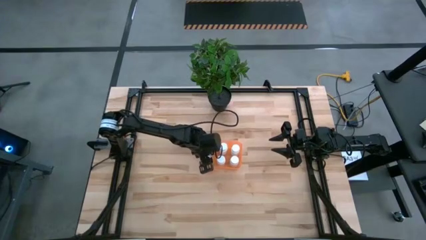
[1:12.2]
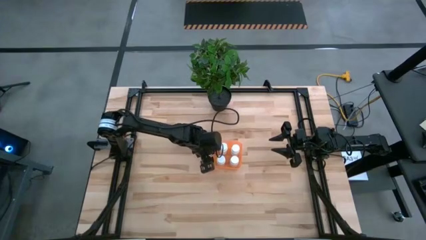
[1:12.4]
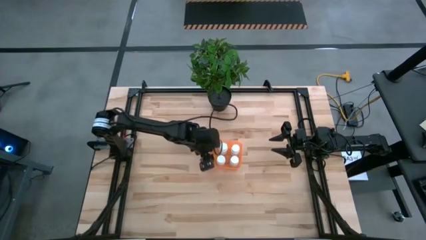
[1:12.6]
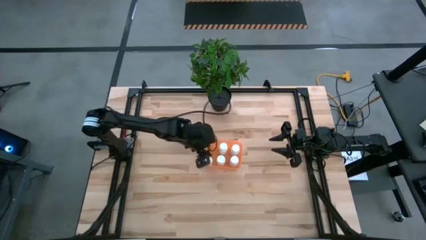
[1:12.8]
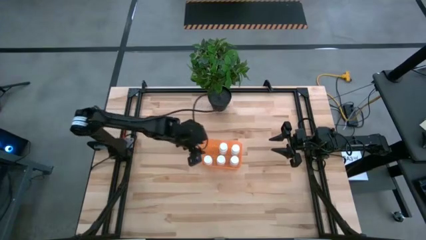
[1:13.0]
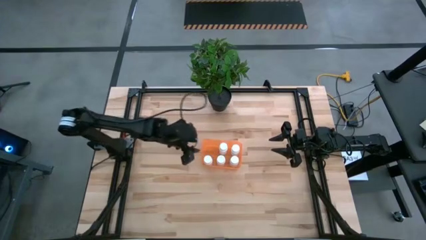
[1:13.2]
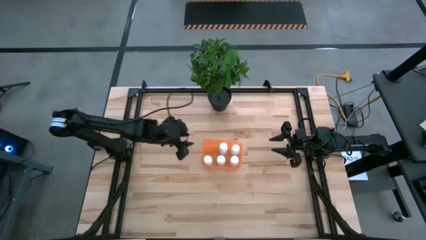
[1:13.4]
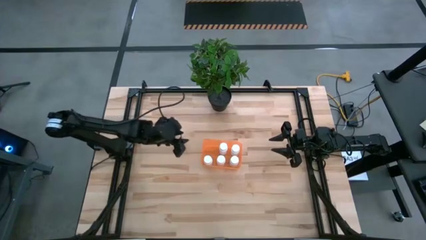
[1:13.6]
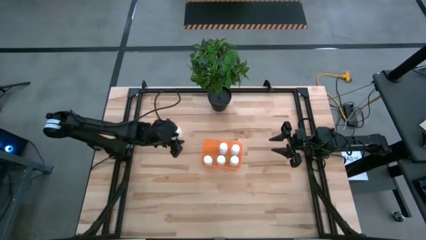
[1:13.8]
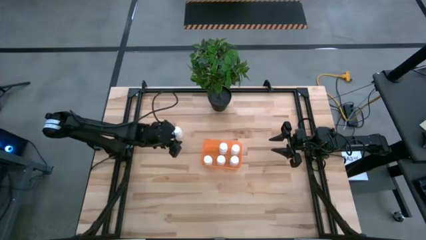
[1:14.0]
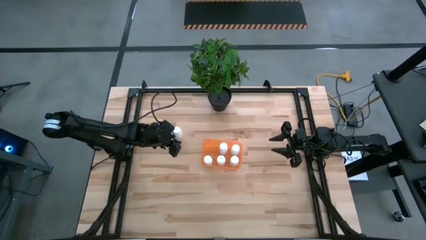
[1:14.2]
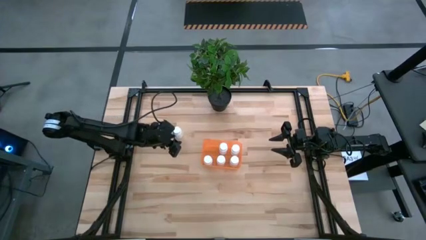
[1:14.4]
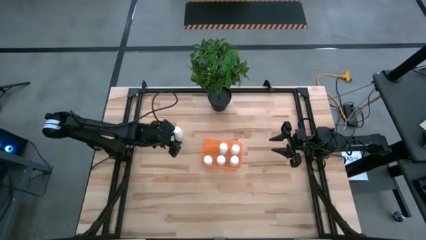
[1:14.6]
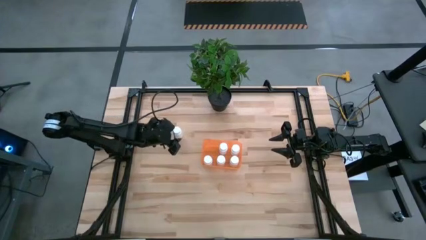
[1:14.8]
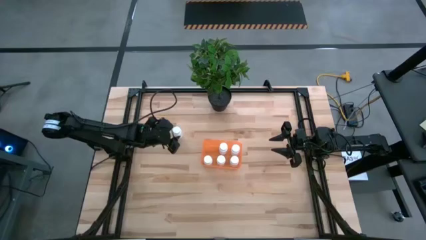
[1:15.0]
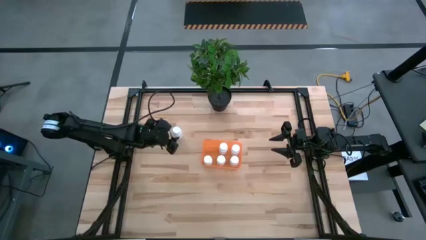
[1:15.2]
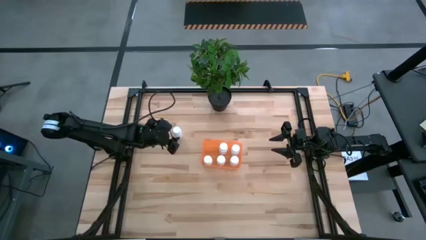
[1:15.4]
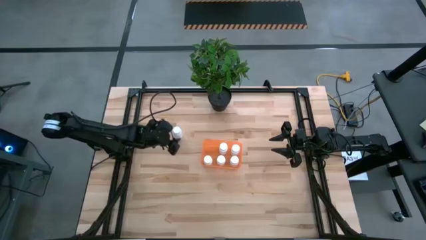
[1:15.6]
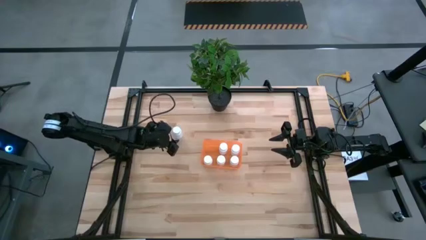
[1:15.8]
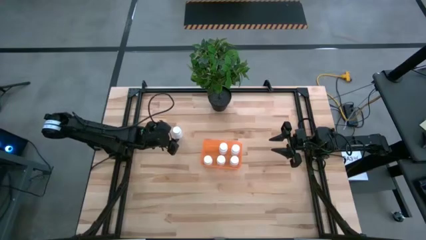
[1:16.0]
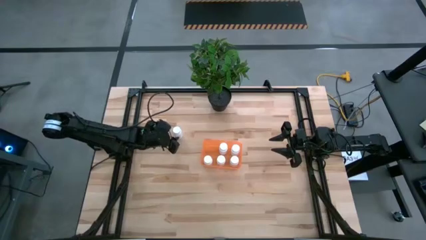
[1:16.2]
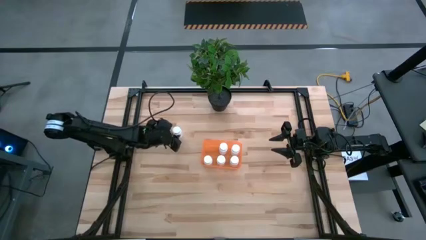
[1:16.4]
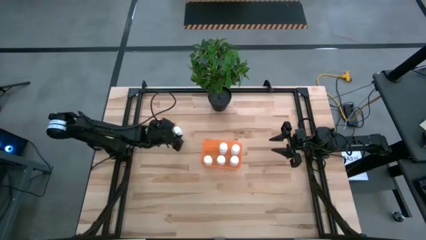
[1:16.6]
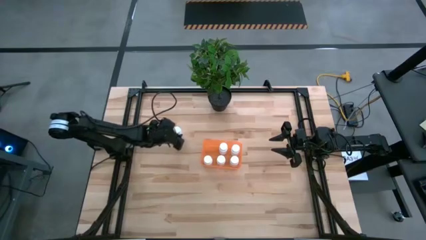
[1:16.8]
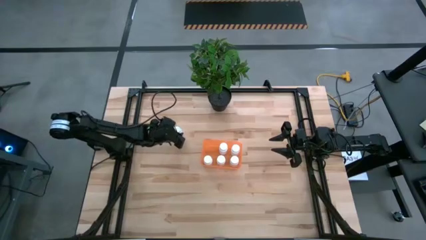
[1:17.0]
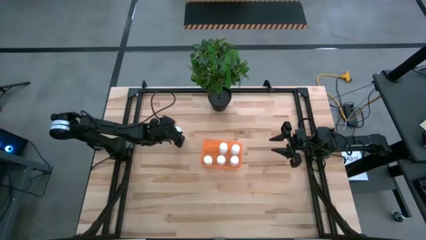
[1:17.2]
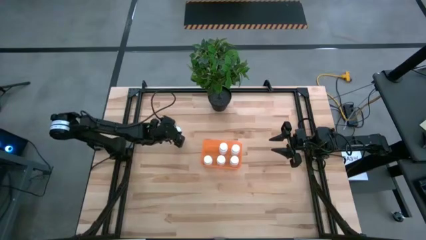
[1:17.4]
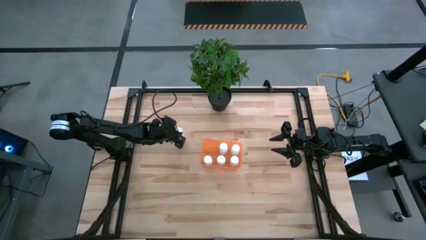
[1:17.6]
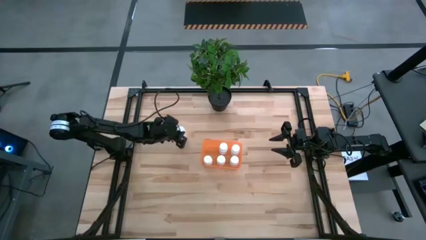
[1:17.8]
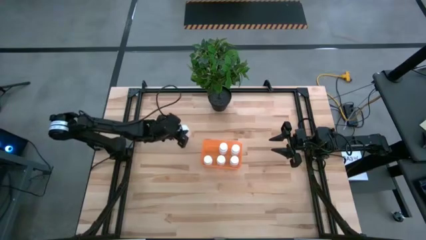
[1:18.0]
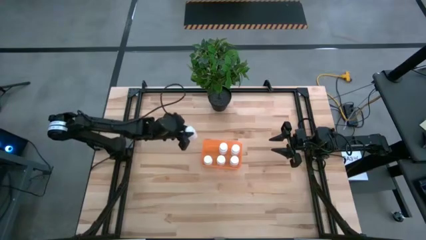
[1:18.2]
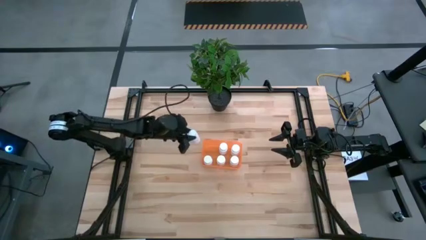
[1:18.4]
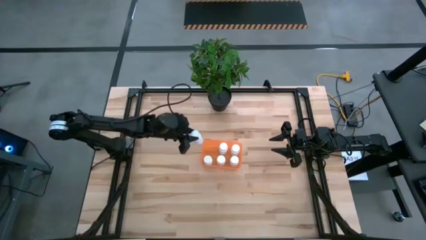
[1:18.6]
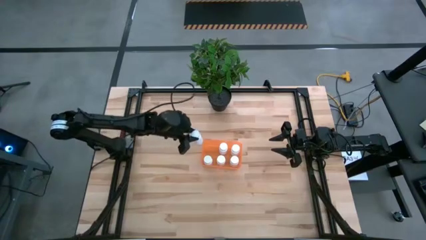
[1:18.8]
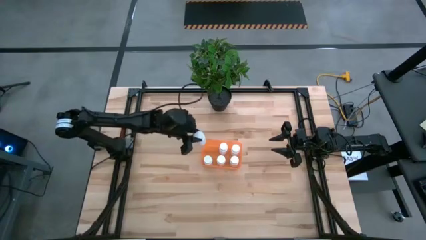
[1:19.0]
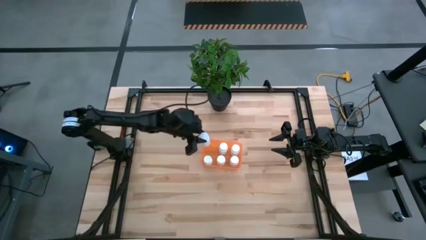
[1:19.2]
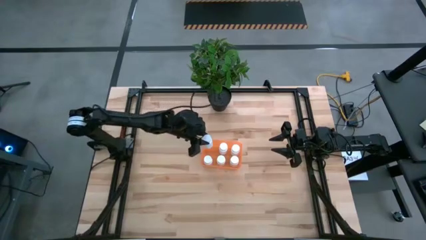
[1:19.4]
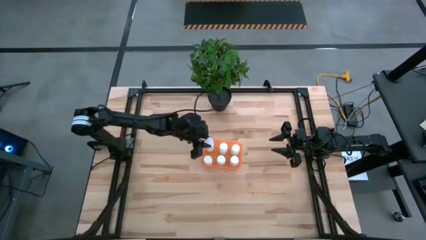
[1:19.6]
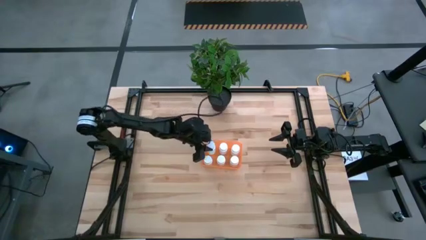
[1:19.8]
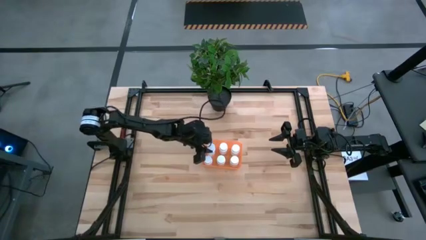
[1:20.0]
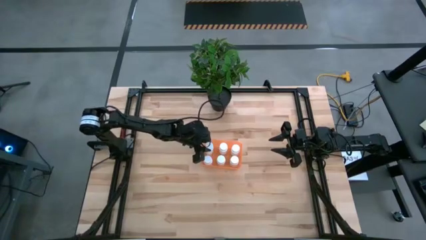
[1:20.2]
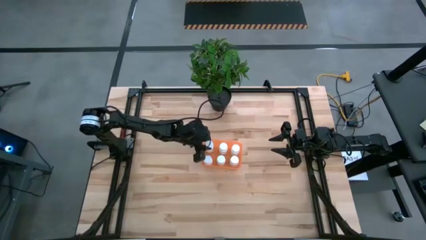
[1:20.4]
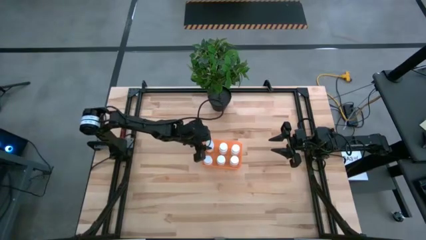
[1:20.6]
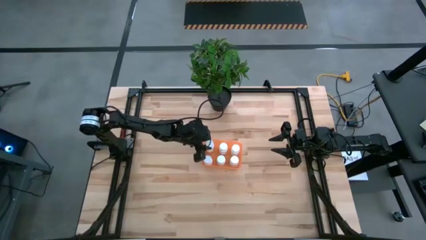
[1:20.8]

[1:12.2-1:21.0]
Task: Pick and place pill bottles into a basket
Put the white pill bottle into the orange bin

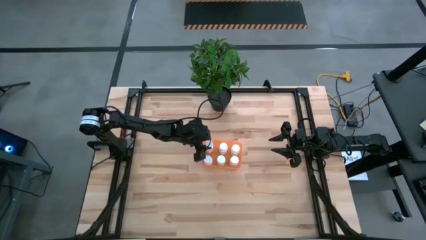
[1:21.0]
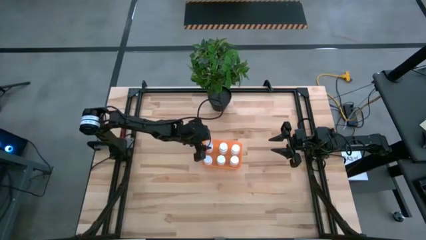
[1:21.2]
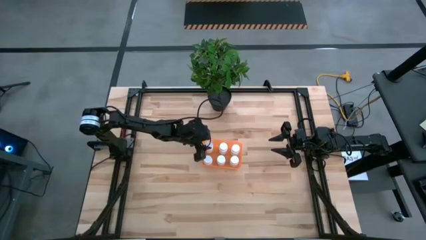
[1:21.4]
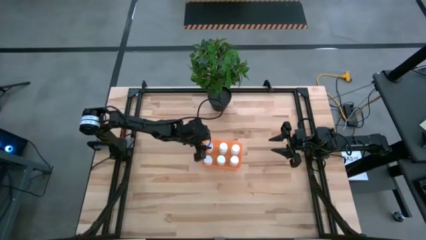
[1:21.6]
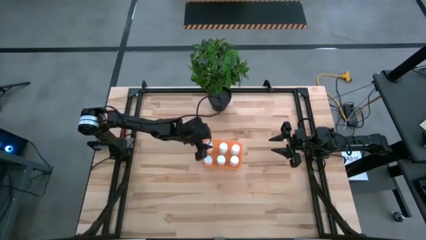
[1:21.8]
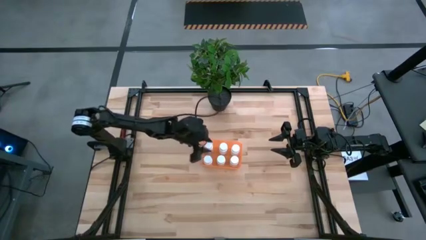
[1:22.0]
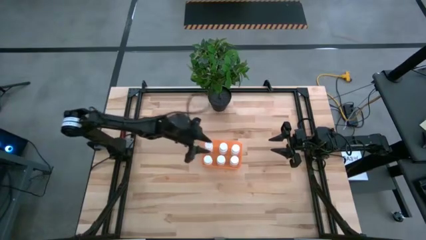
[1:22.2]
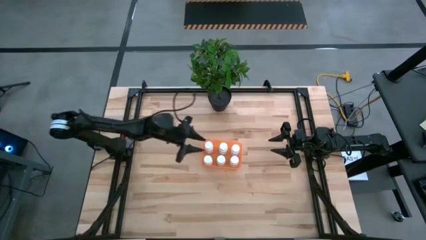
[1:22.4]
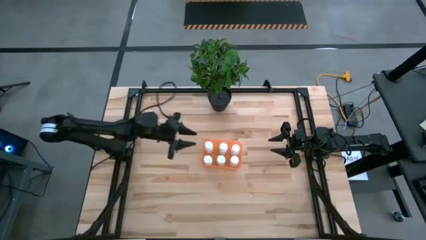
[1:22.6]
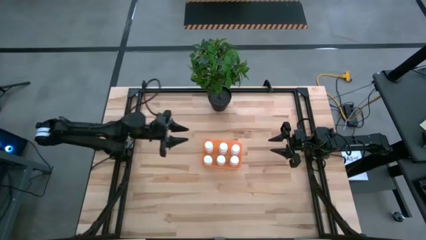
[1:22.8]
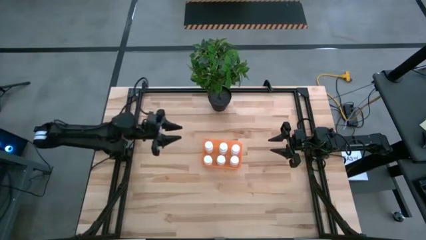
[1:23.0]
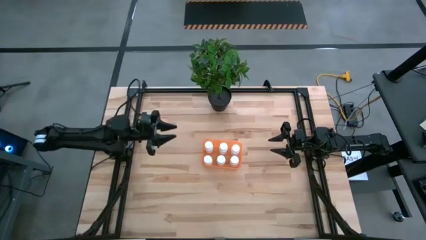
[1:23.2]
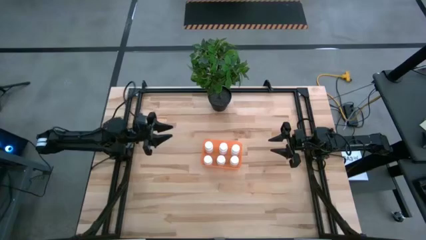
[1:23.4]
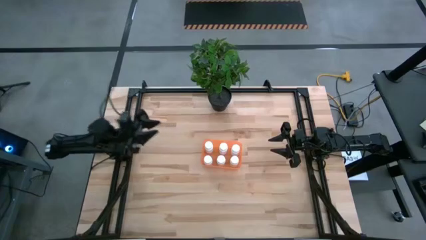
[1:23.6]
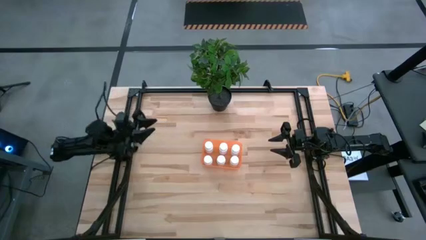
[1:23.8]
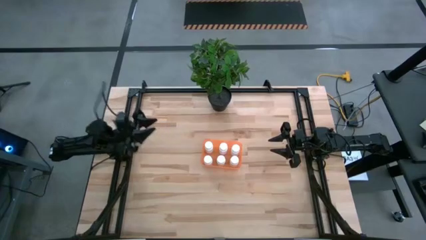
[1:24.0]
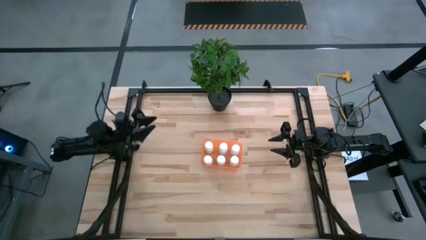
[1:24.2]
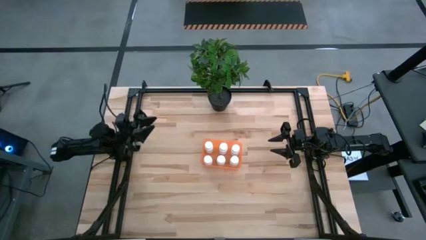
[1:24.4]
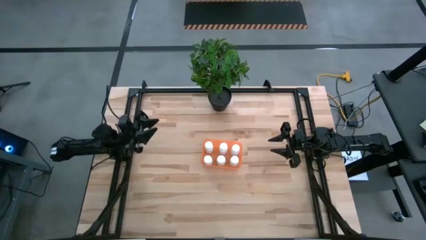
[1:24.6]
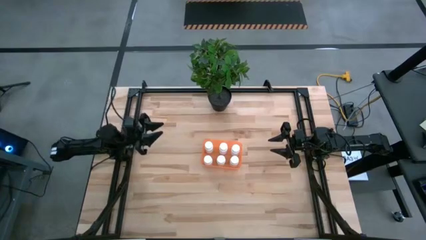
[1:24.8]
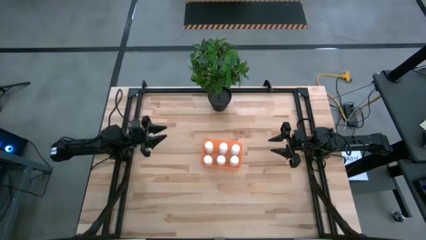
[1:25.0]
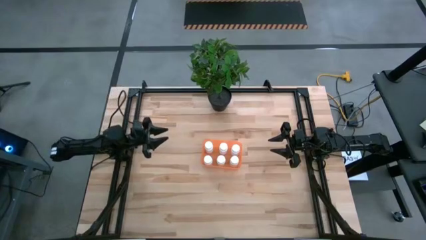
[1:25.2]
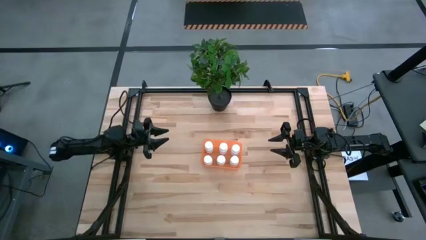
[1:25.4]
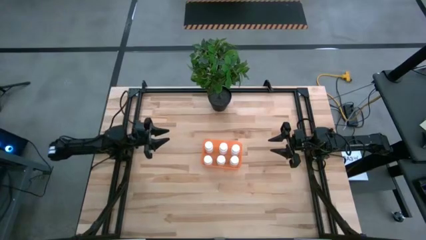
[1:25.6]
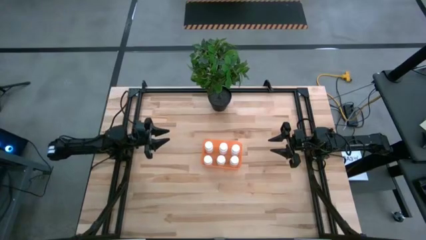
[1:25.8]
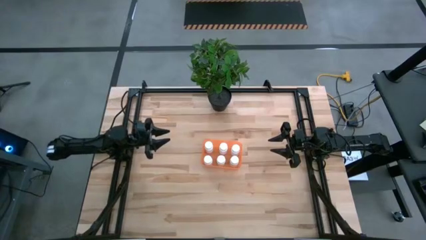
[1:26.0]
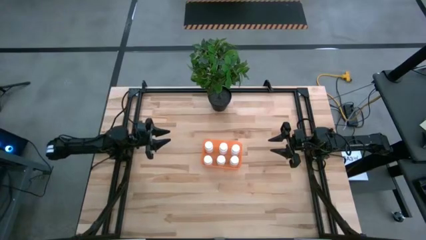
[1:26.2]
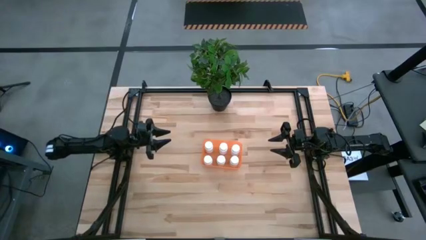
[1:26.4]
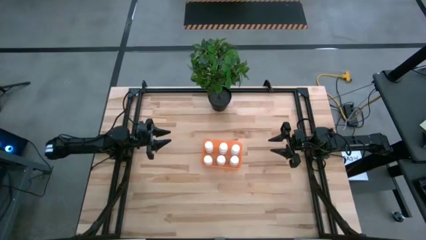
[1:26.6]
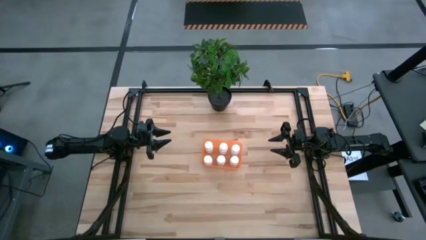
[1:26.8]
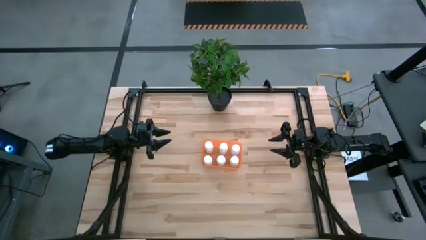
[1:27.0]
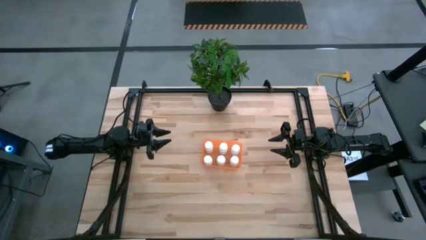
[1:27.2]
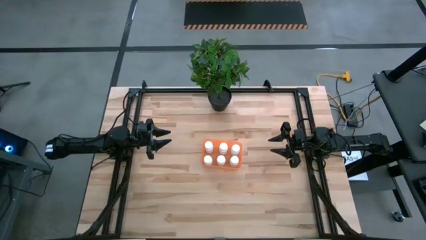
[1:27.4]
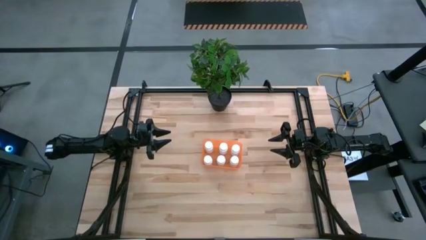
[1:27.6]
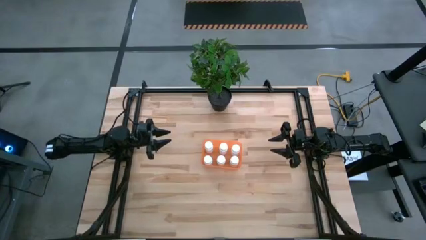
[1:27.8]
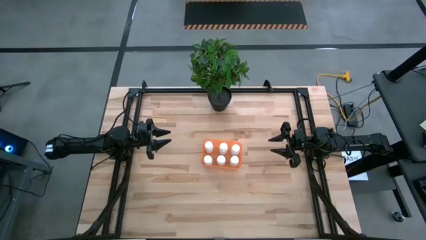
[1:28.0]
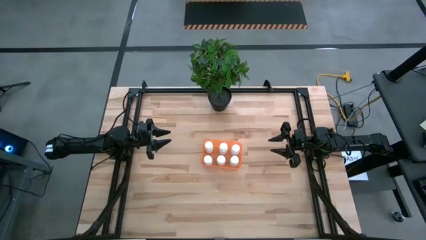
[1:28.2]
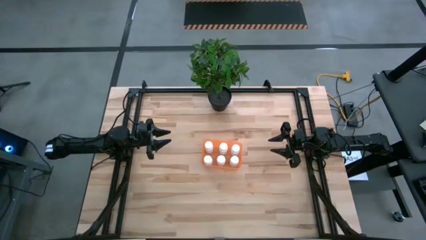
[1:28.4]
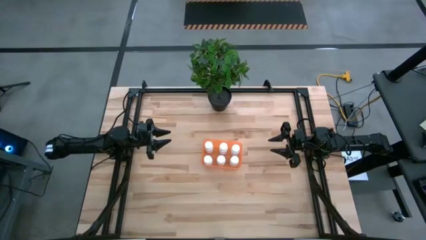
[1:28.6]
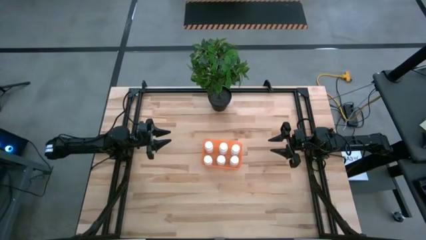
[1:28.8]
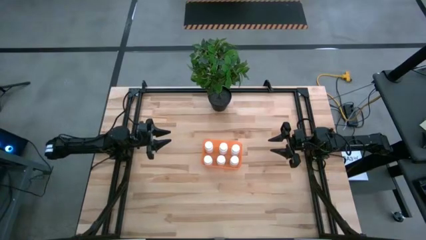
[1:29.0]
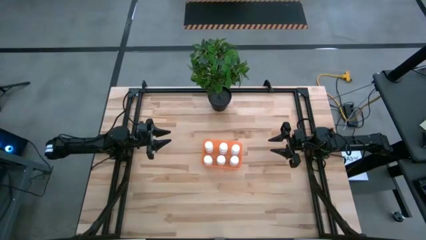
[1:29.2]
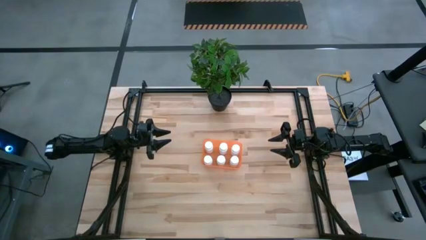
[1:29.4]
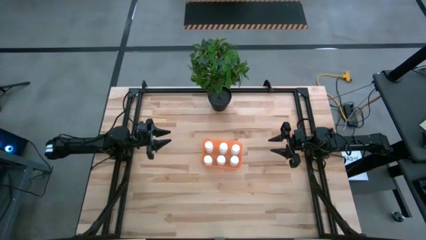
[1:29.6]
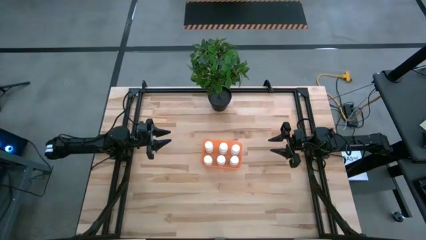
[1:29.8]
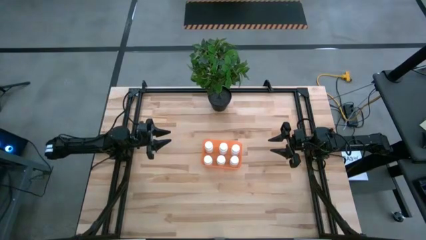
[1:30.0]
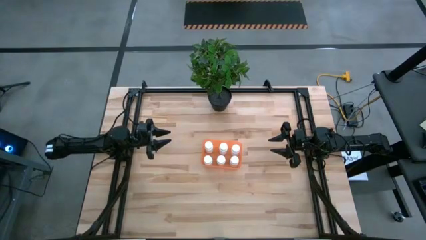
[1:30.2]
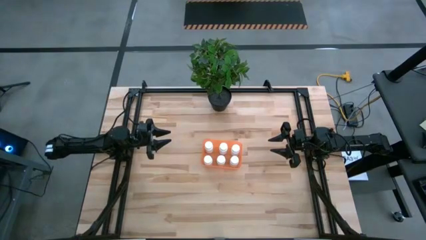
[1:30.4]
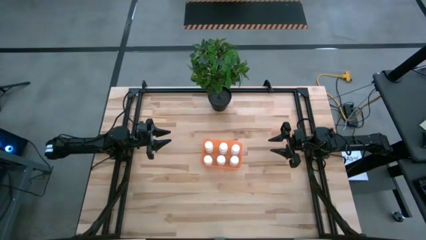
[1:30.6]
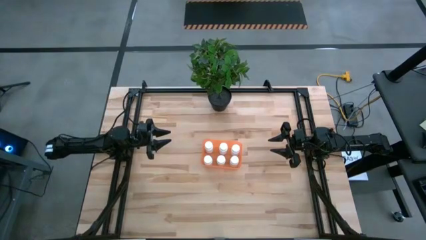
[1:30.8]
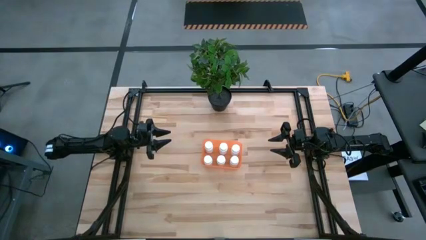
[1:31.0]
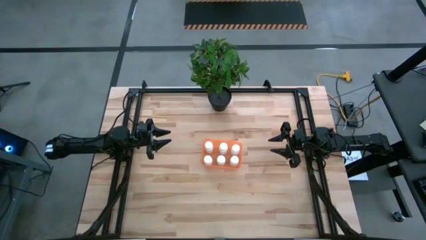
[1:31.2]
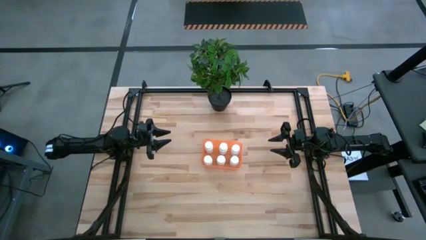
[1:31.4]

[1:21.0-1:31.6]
Return to Home Position
